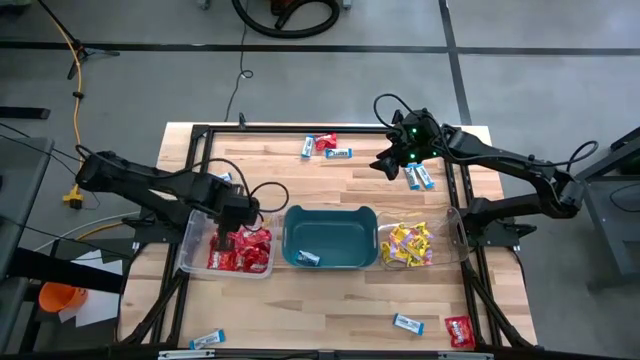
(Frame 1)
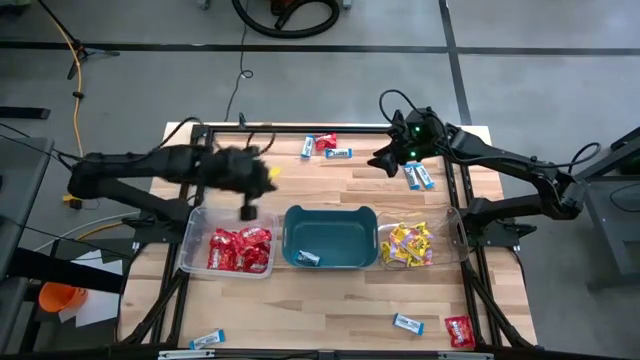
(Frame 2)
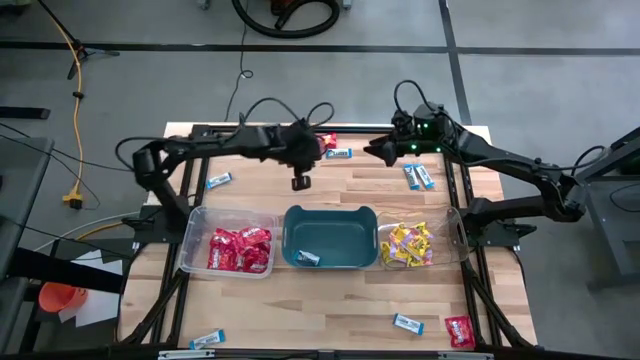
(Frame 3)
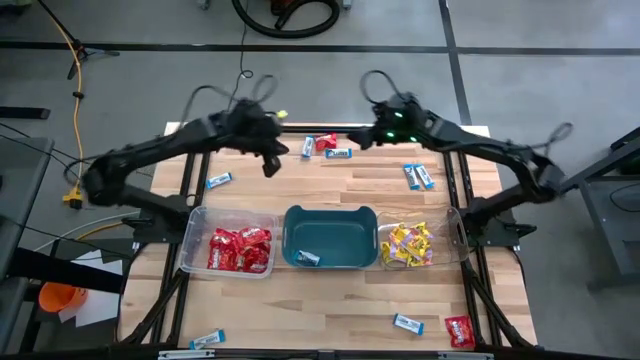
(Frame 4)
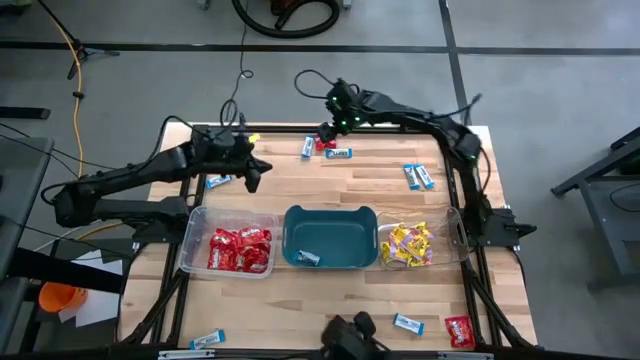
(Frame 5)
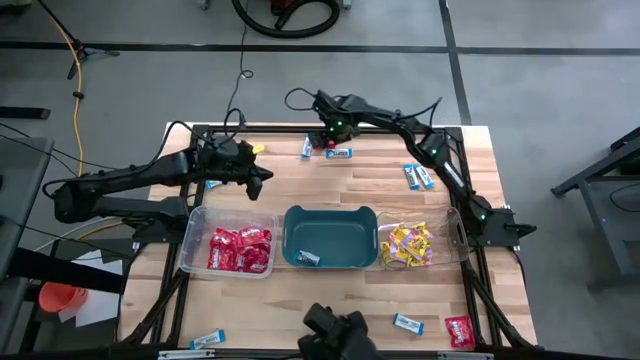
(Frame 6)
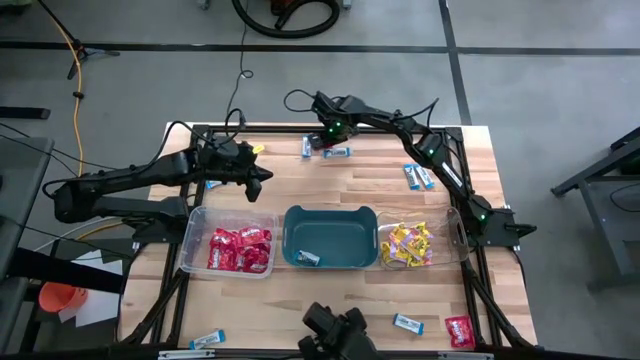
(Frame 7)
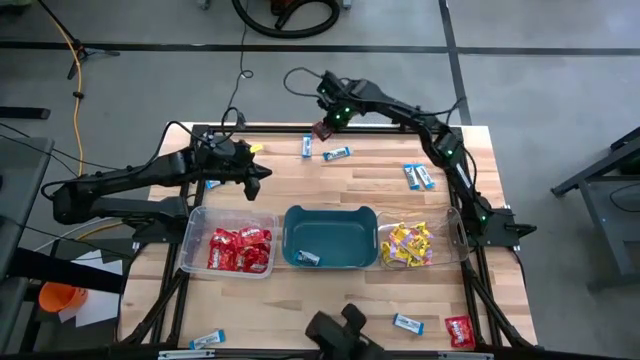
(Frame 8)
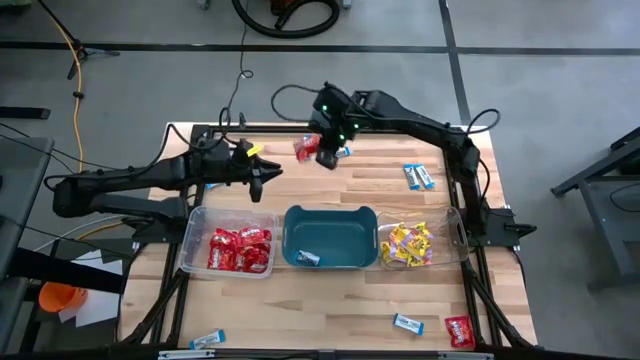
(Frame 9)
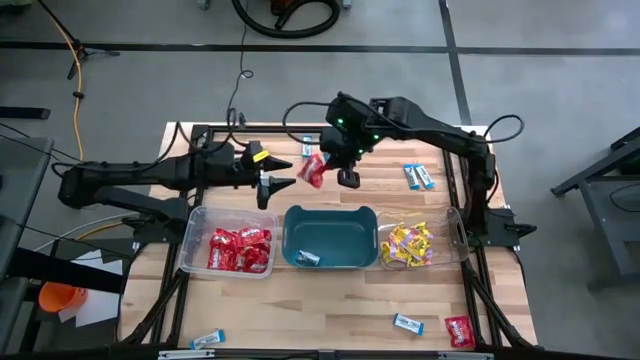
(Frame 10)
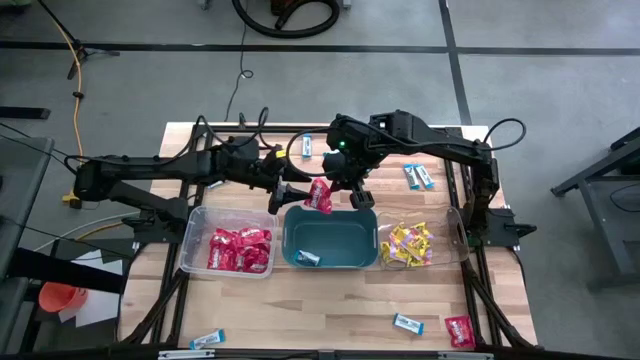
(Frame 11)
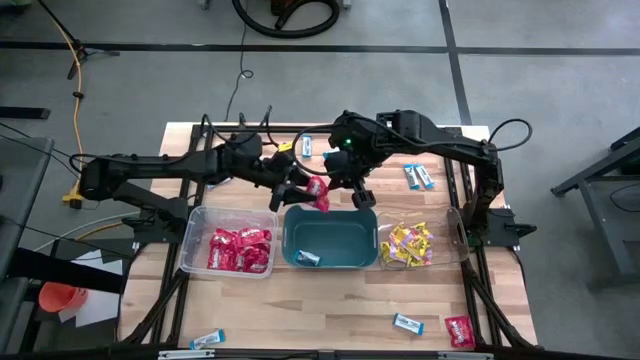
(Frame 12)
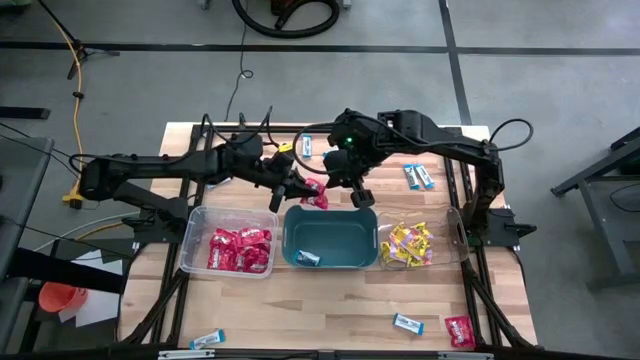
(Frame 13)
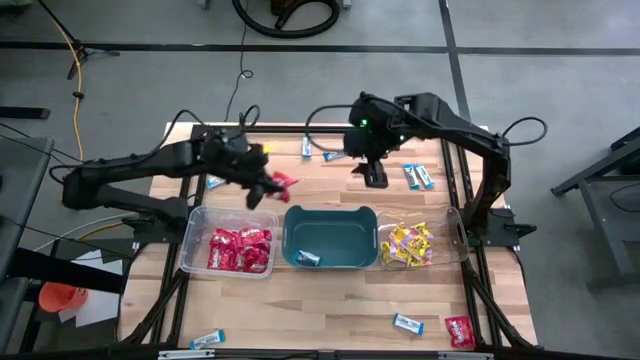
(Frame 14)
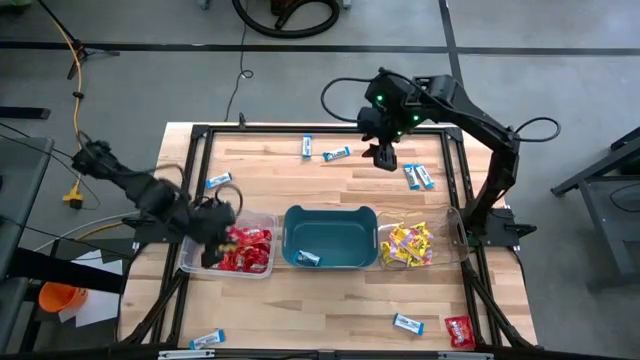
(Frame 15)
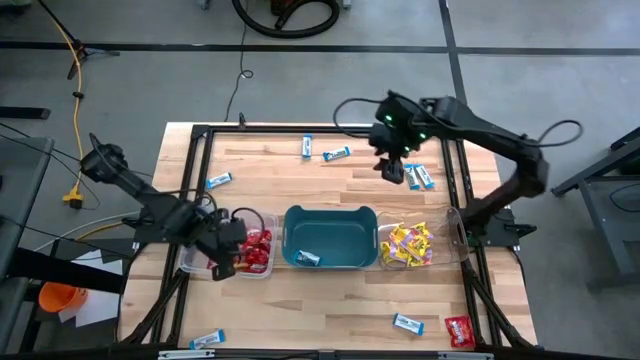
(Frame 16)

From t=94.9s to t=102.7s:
Task: Sort candy
Put the red candy into the left transparent bin

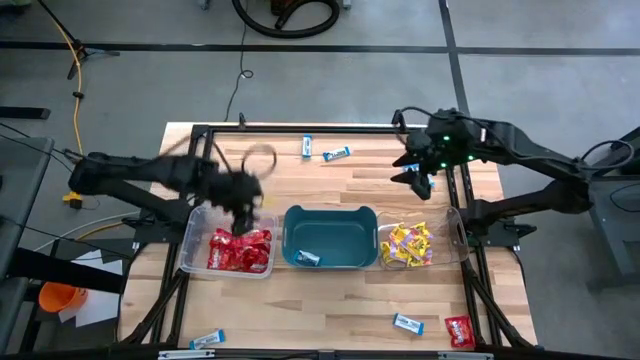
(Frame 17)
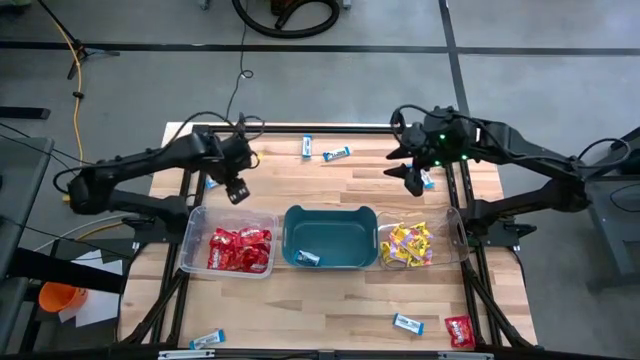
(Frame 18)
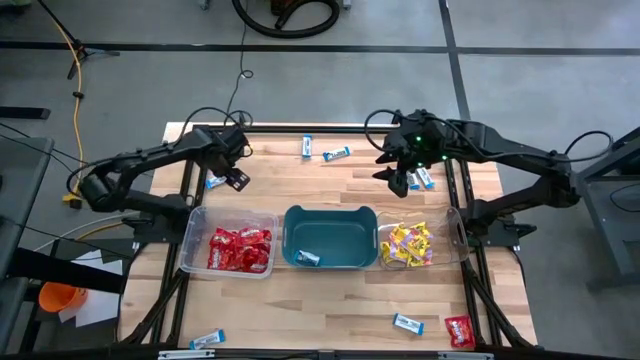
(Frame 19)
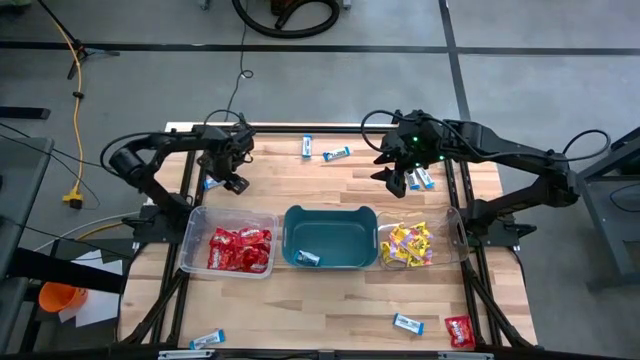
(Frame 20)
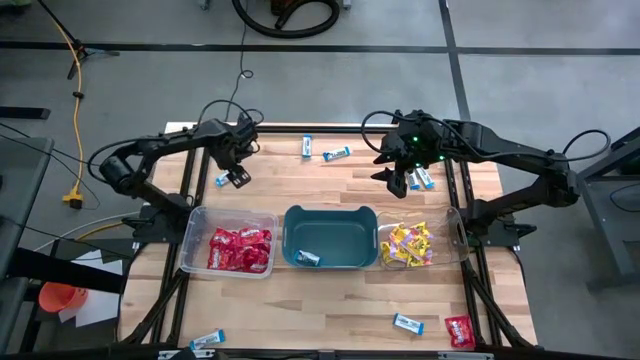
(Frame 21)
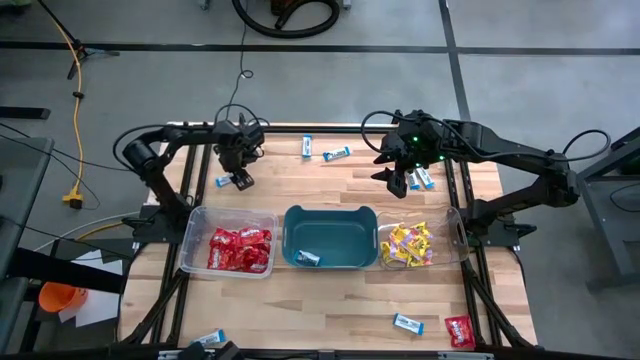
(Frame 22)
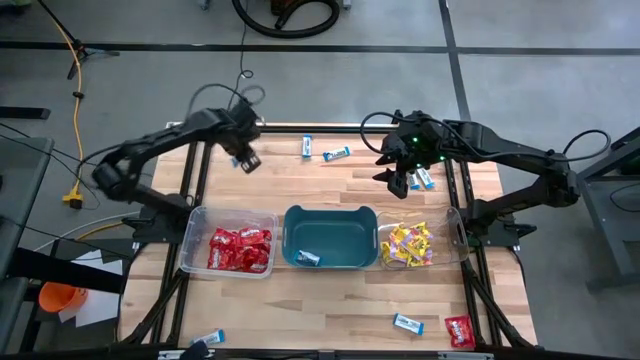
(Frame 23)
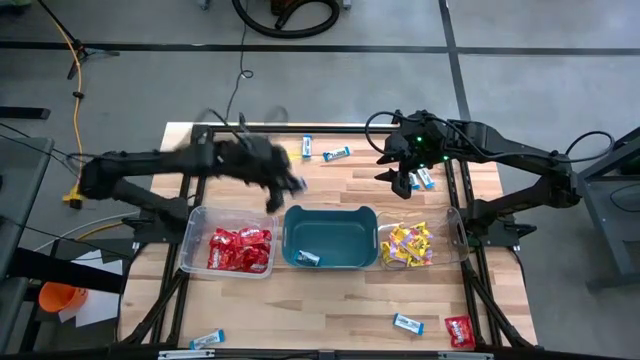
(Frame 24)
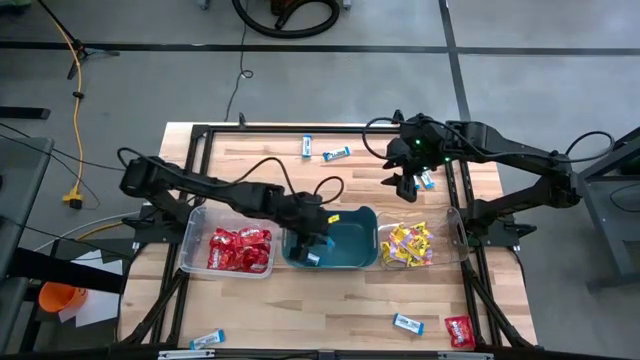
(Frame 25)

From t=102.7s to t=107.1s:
Put the white chocolate into the blue bin

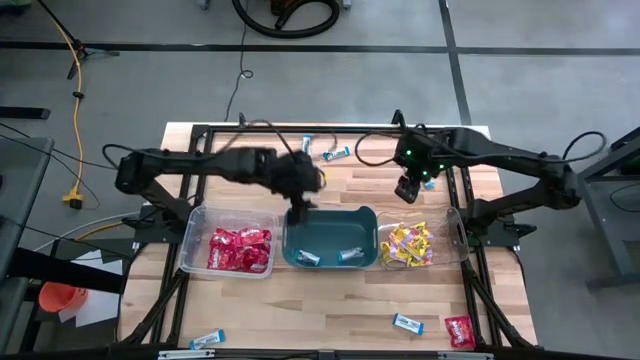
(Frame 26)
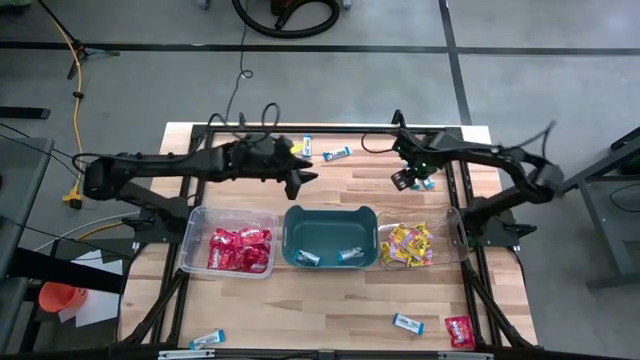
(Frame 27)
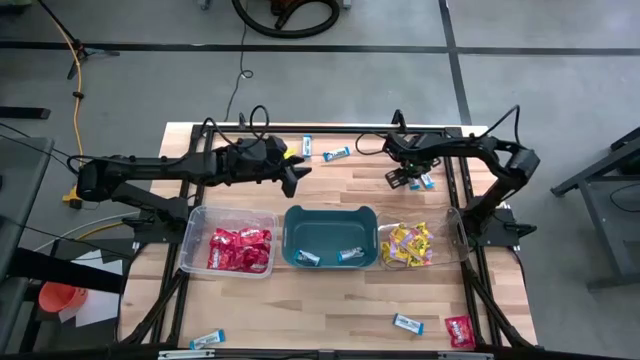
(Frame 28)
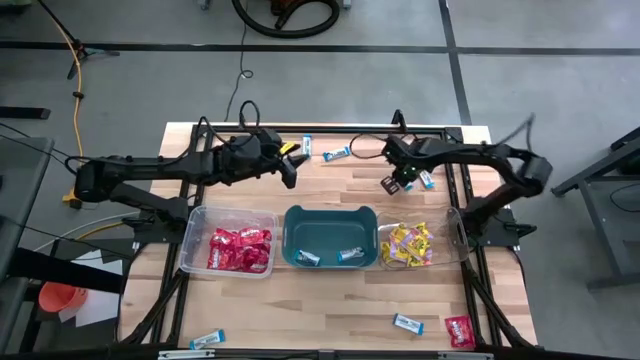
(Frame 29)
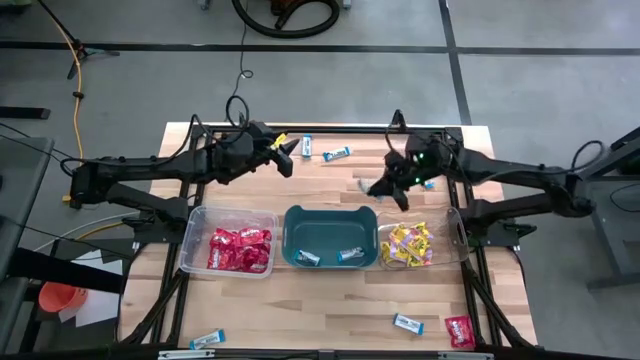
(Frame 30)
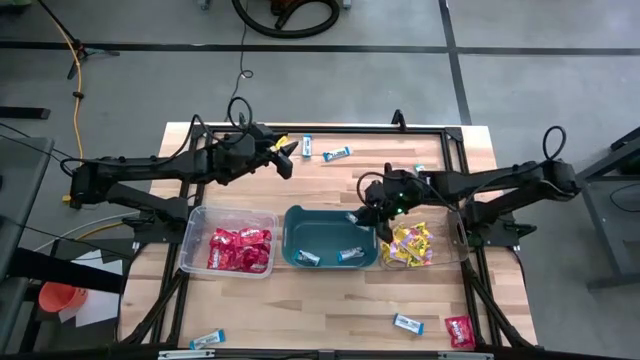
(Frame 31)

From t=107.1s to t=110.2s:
Put the white chocolate into the blue bin

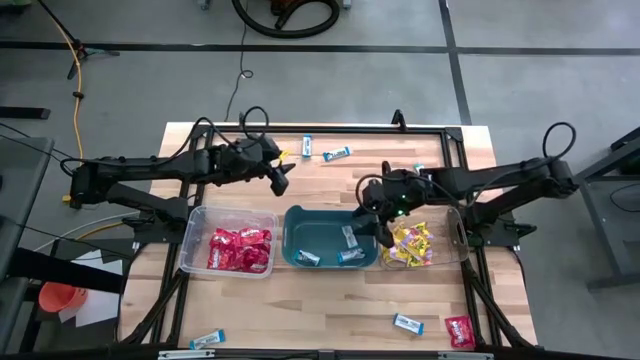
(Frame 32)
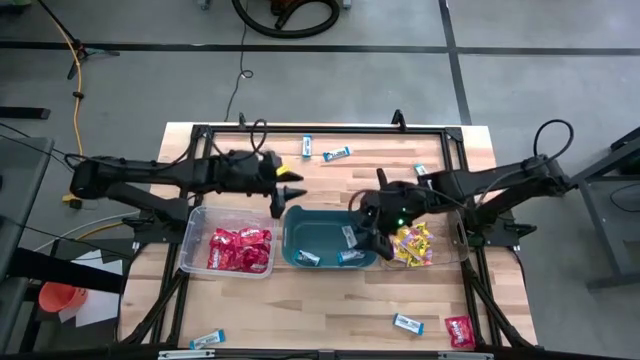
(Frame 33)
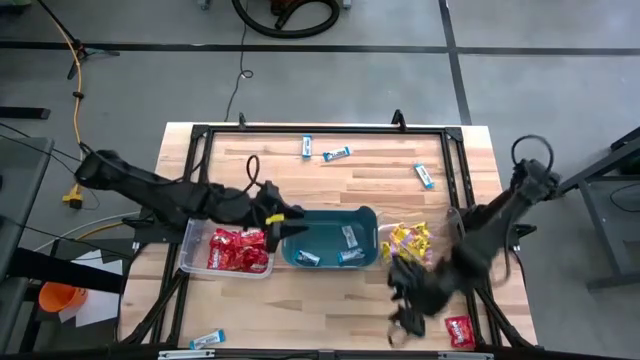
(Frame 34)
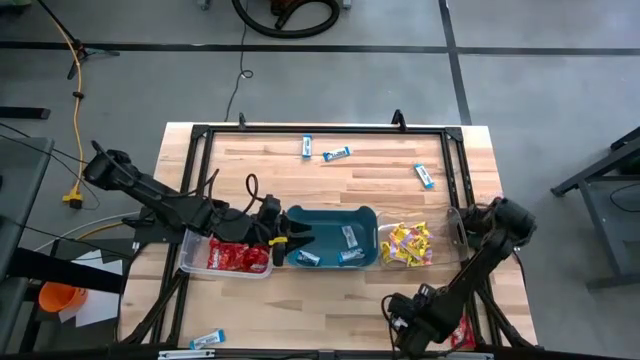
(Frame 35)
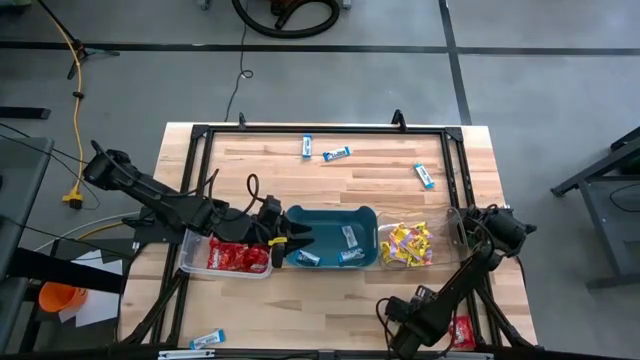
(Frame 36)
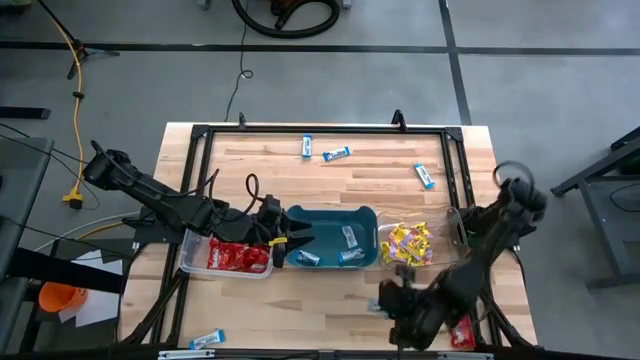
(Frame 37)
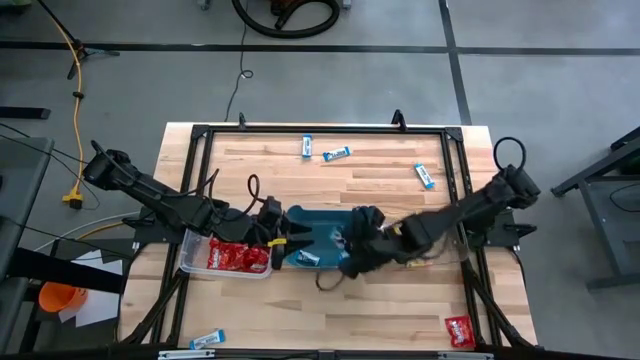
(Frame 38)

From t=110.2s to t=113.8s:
Put the white chocolate into the blue bin

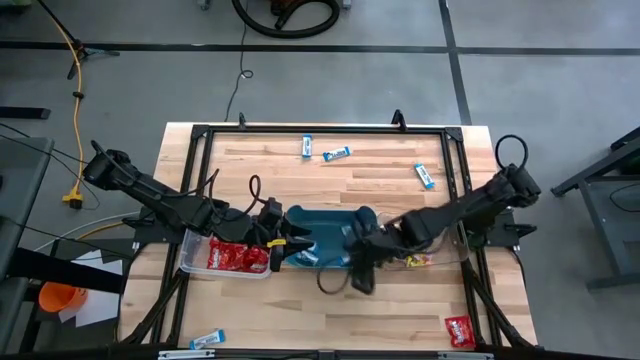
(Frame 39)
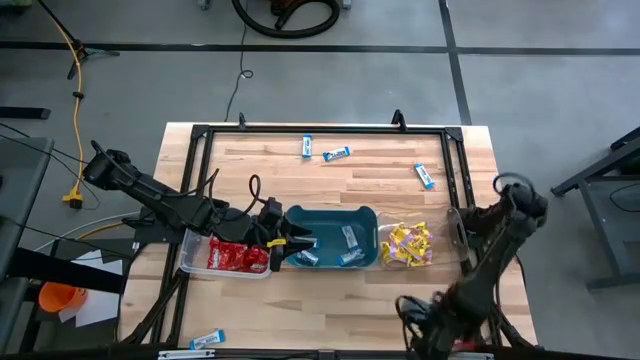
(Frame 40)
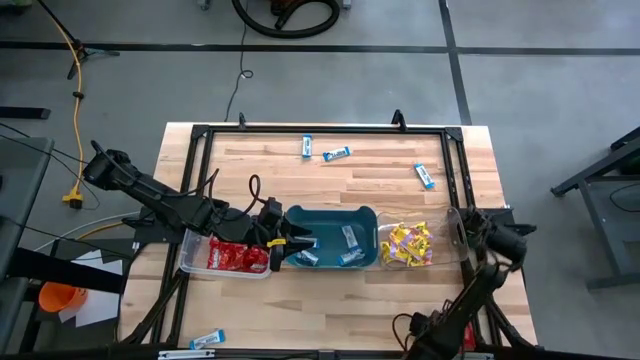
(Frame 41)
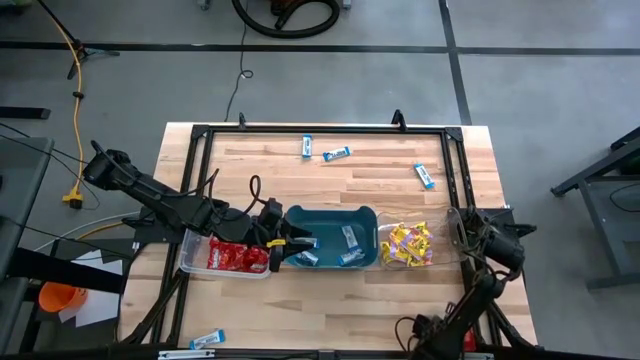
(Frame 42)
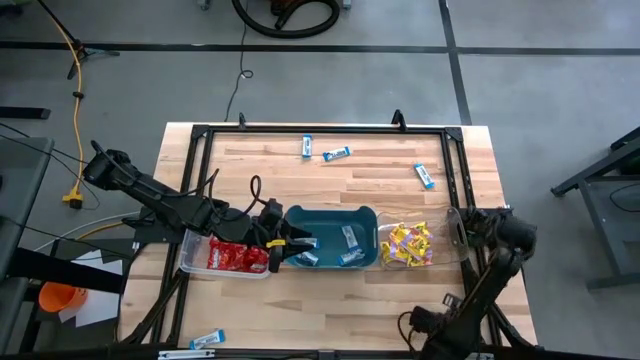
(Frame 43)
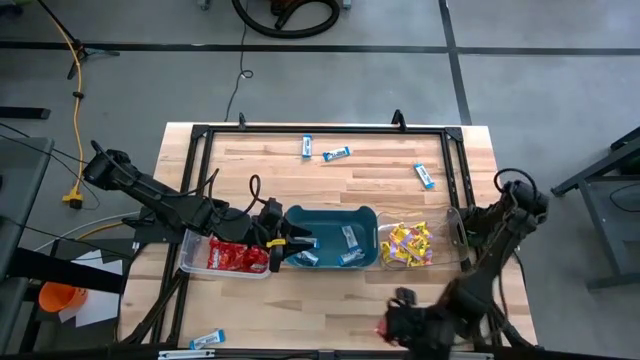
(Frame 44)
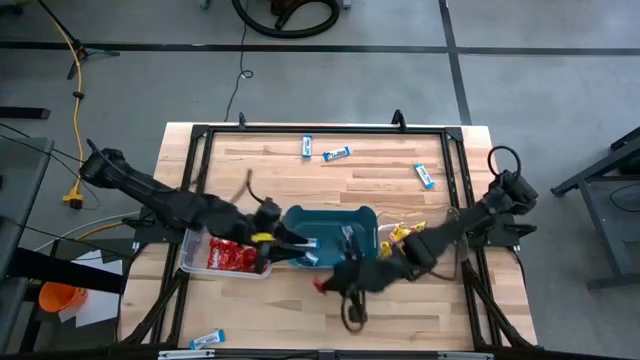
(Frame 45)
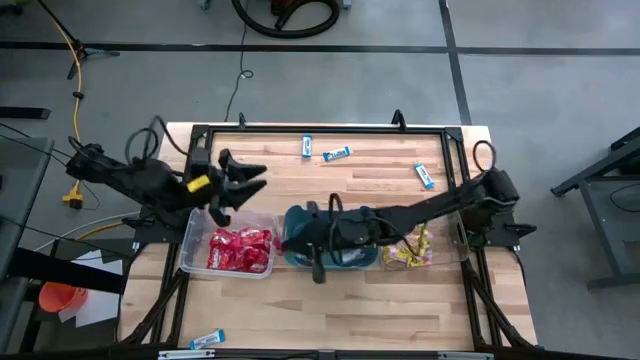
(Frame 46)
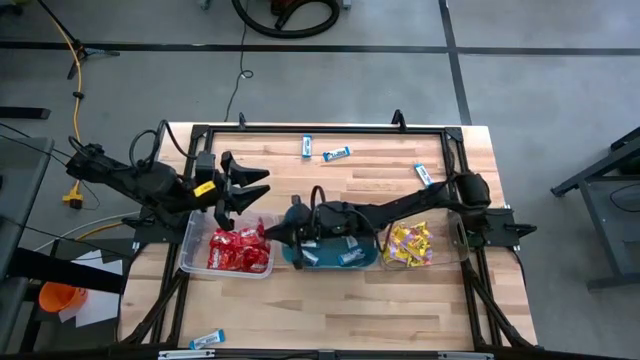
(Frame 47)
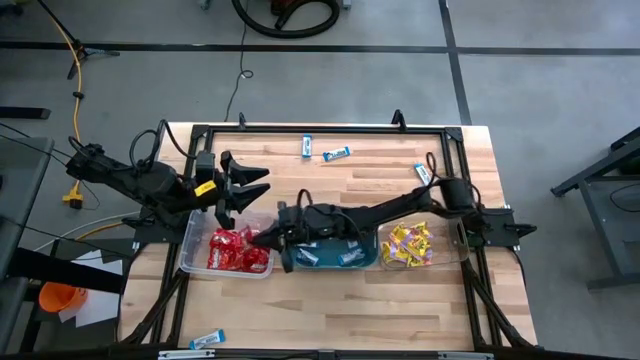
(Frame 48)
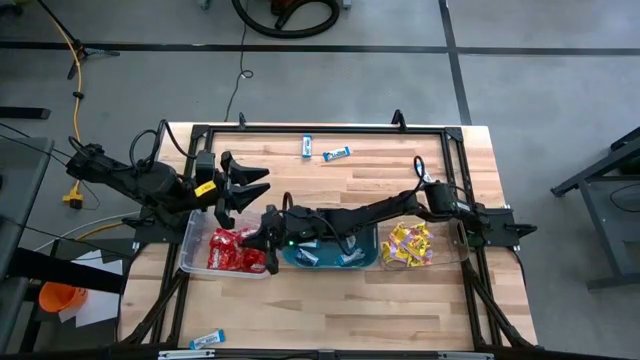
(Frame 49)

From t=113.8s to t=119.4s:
Put the red candy into the left transparent bin
